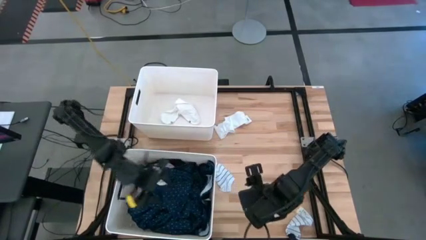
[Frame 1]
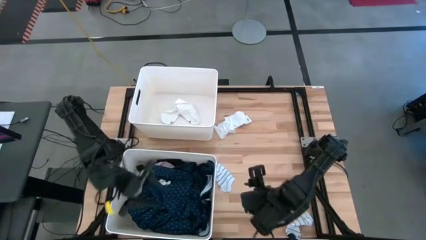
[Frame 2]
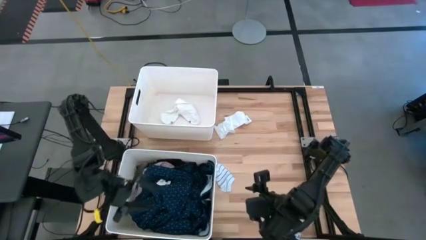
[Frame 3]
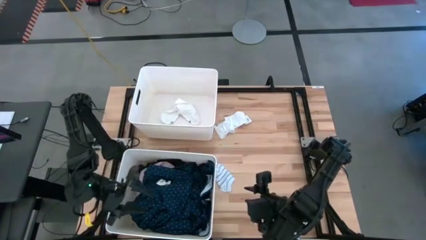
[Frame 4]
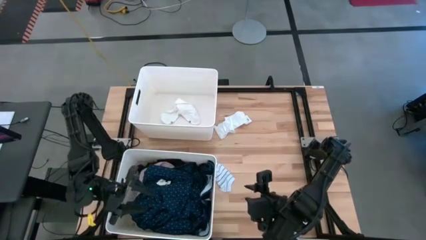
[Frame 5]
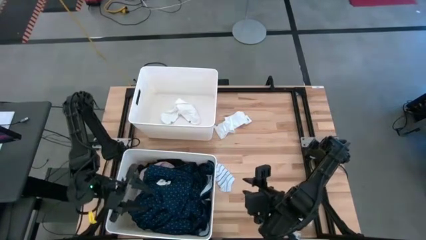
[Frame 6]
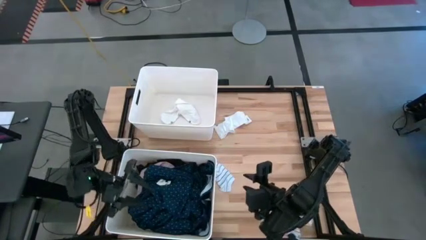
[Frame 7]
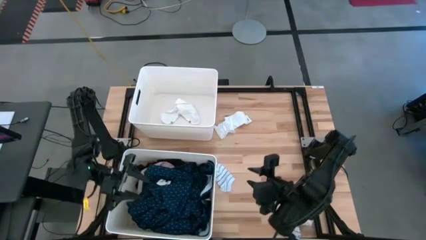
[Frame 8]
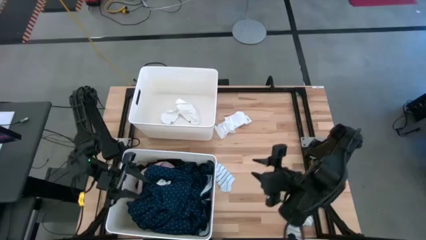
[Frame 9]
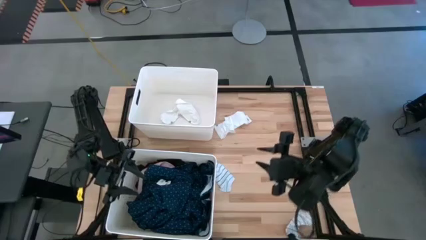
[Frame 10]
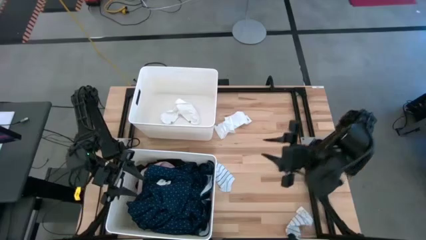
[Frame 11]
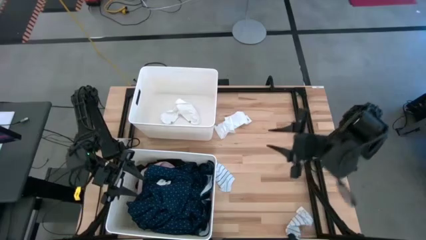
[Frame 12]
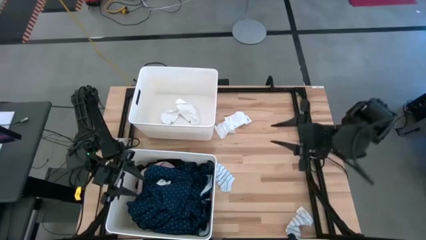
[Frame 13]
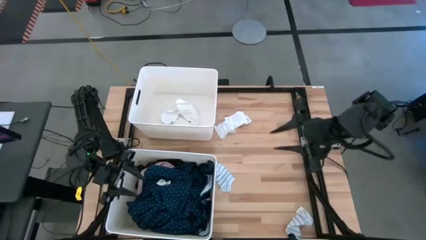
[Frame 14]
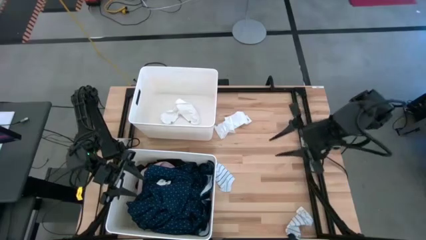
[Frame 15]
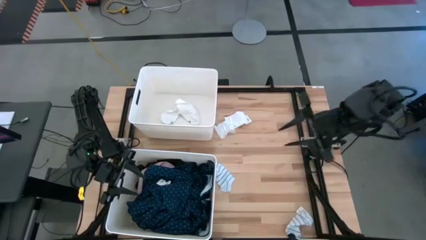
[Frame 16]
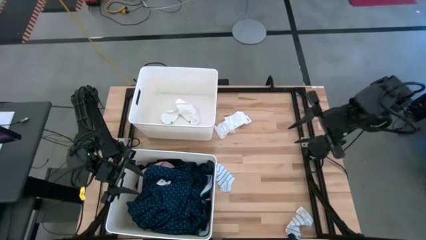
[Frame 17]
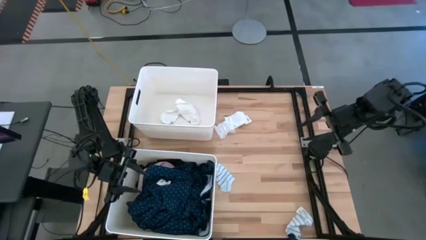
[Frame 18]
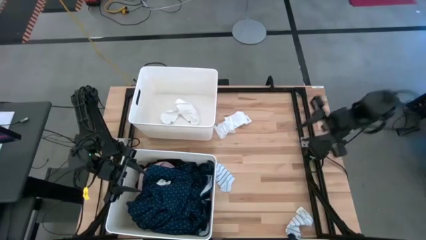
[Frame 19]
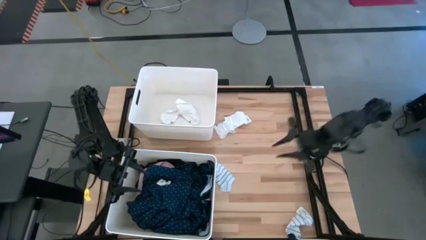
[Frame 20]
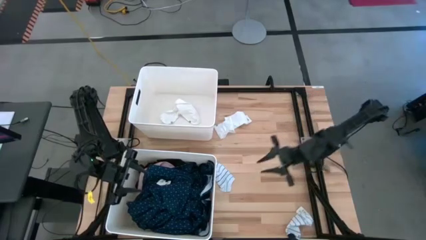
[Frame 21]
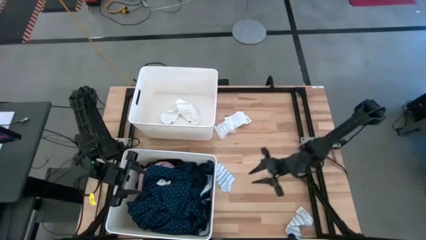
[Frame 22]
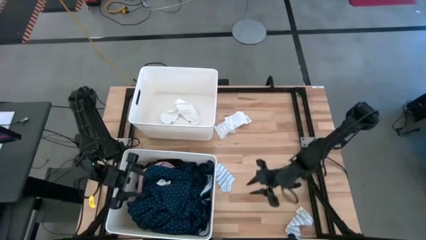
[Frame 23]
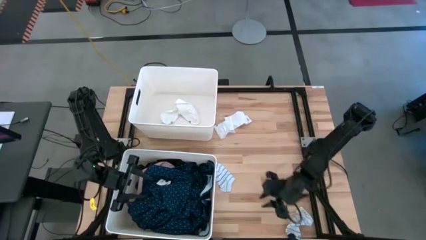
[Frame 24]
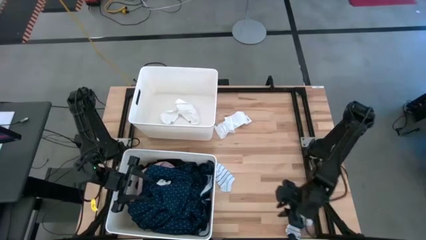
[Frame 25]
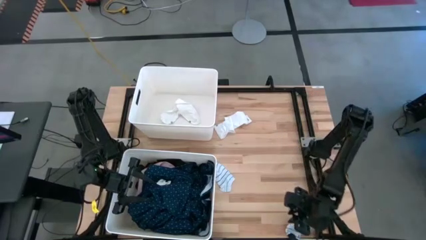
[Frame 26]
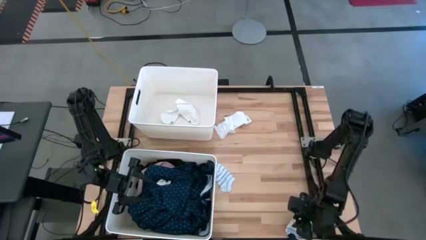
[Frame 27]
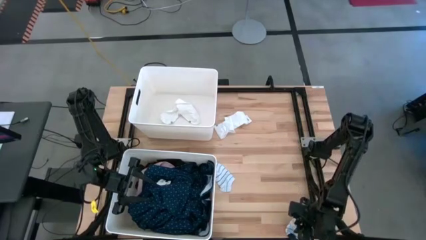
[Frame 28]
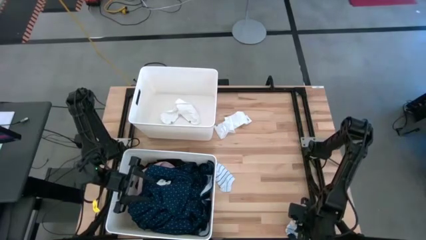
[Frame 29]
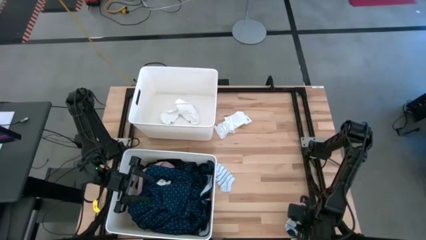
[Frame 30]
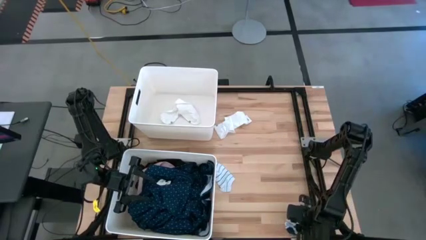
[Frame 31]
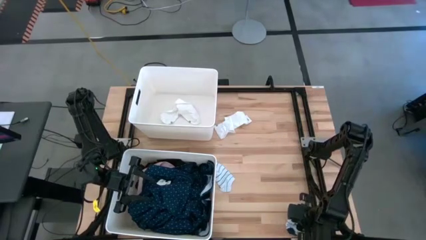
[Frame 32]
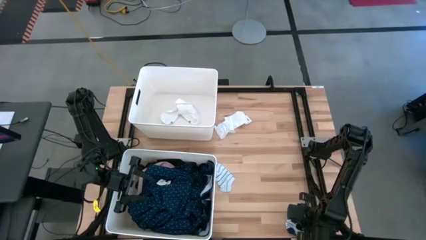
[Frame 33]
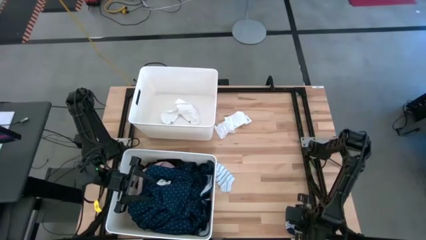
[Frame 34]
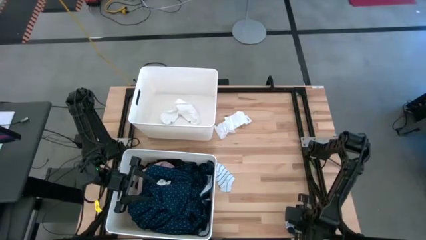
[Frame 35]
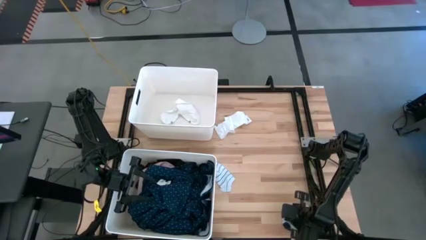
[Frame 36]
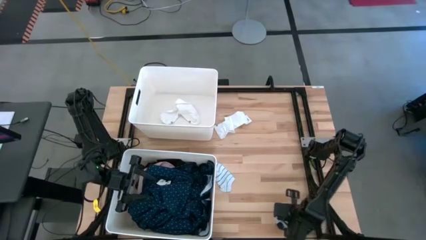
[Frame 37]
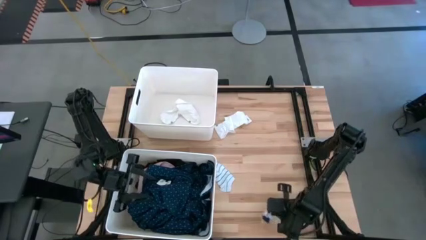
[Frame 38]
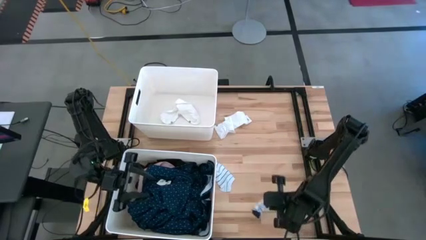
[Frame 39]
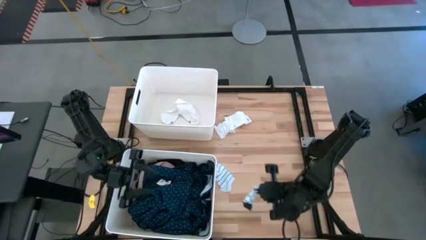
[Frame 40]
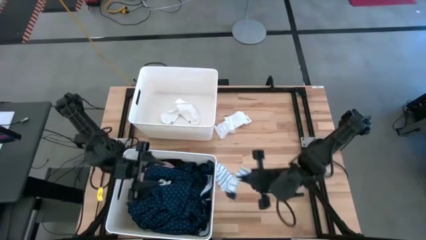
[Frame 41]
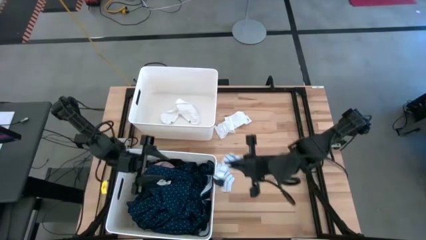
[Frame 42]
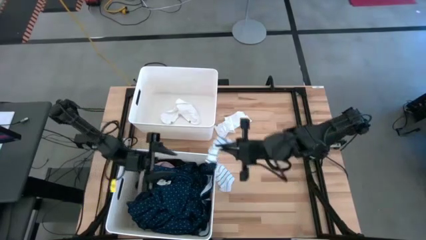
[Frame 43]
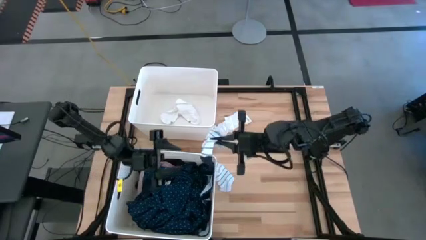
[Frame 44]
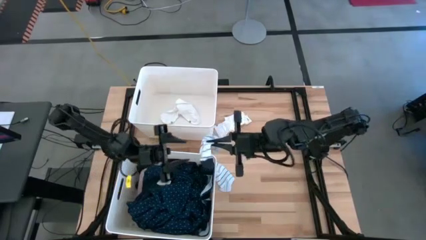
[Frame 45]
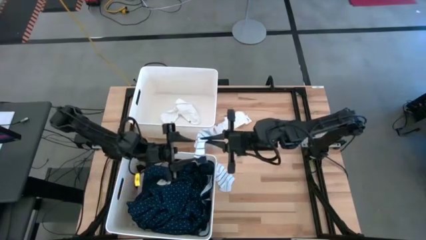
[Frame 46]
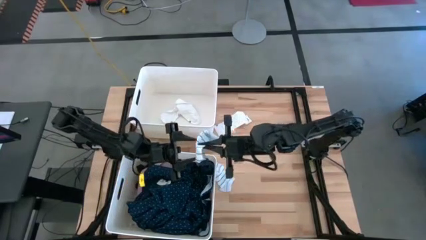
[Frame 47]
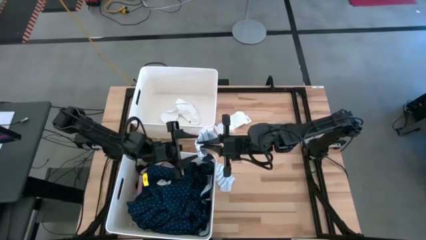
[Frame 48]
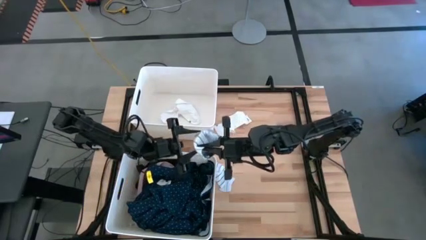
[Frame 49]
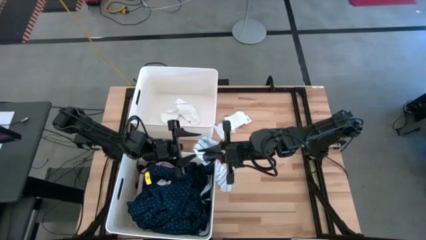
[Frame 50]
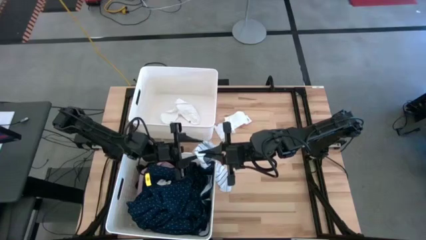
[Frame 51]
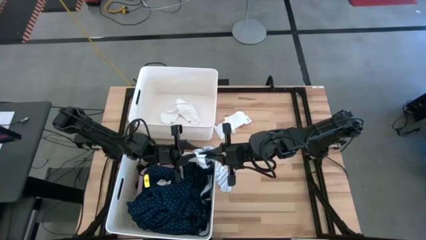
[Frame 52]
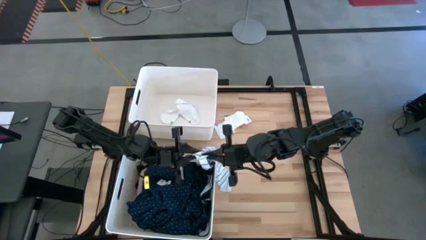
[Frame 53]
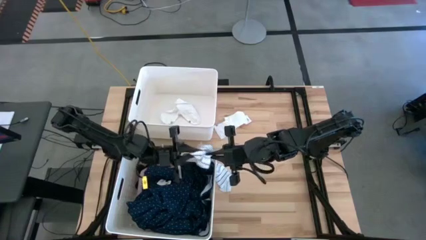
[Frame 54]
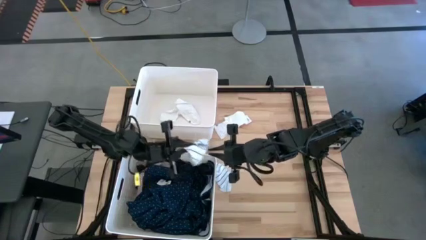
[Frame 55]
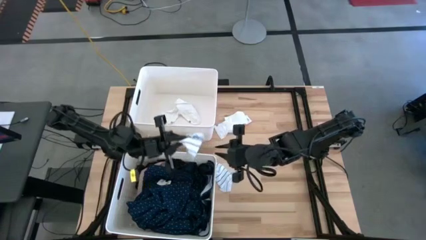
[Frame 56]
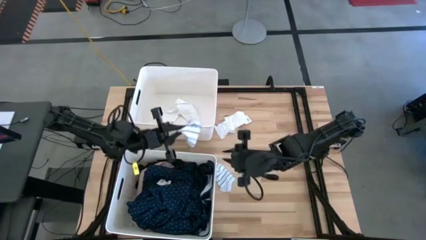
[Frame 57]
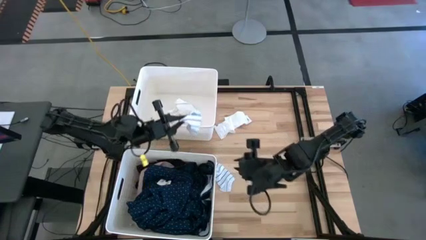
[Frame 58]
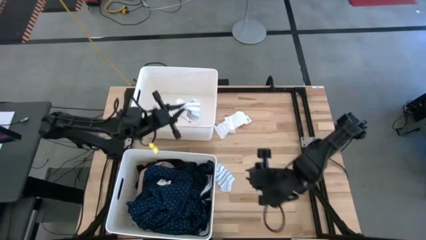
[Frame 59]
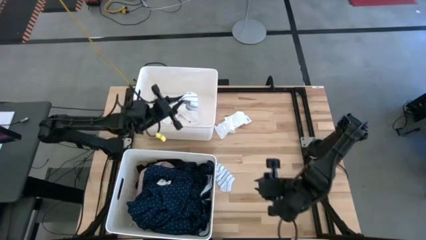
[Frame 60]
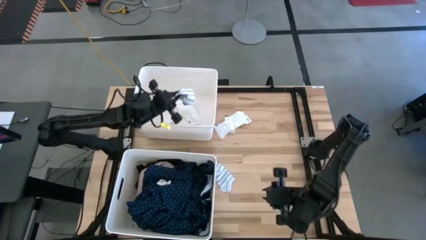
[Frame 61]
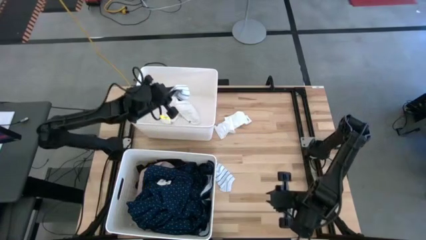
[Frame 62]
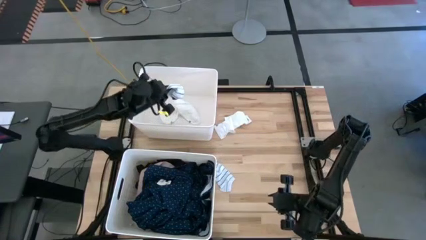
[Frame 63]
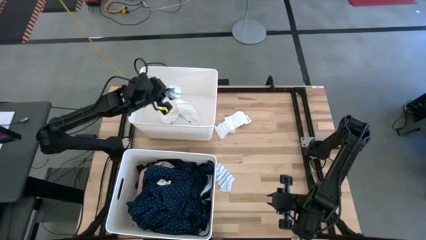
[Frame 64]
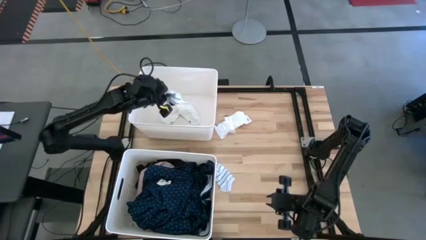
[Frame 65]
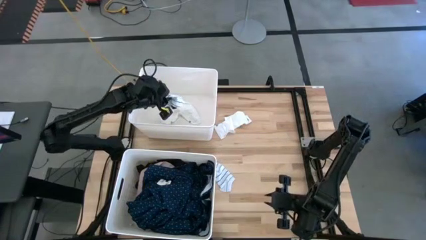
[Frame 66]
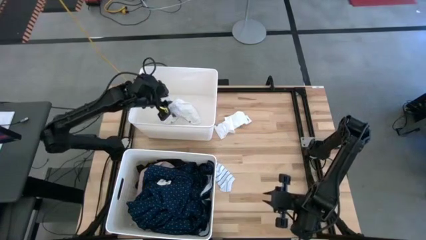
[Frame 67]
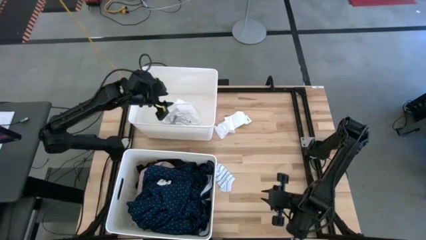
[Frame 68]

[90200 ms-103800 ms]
Task: Sort clothes
Put the white striped sock into the top laundry organizer
